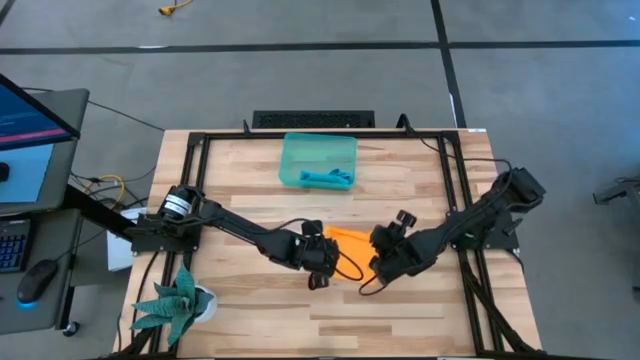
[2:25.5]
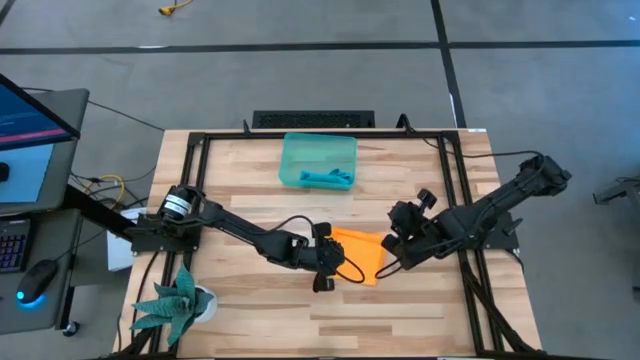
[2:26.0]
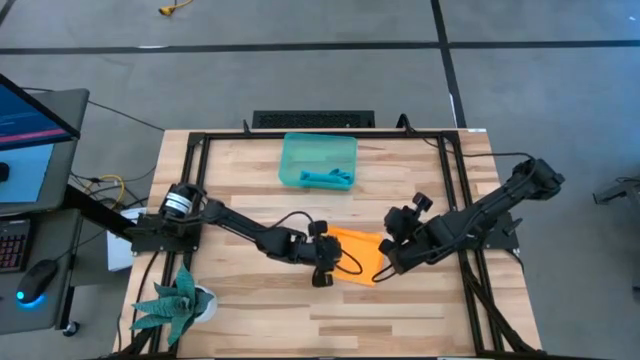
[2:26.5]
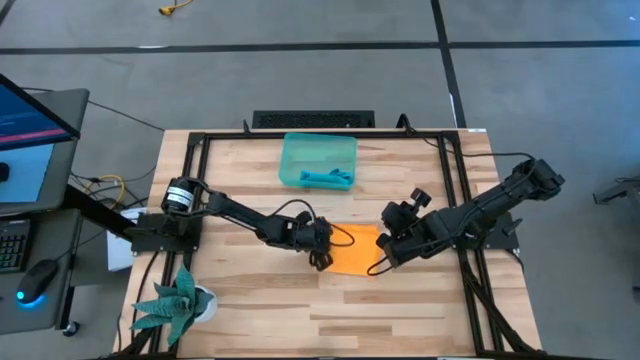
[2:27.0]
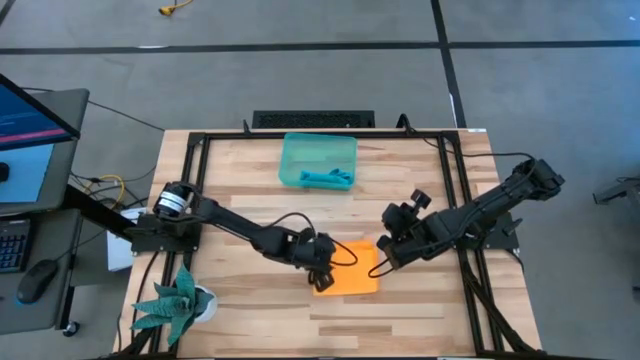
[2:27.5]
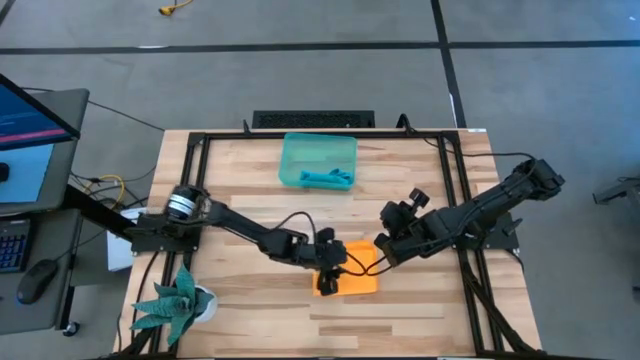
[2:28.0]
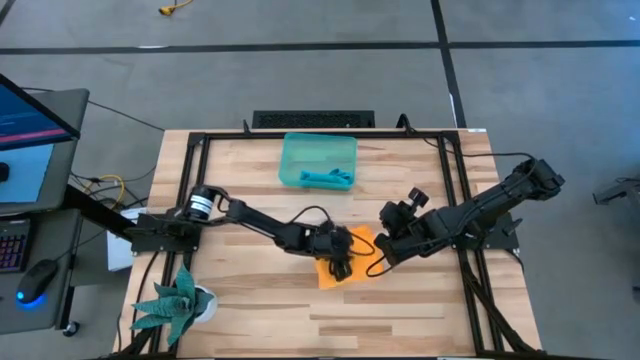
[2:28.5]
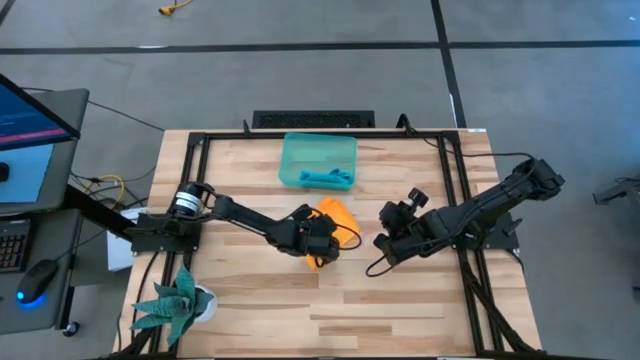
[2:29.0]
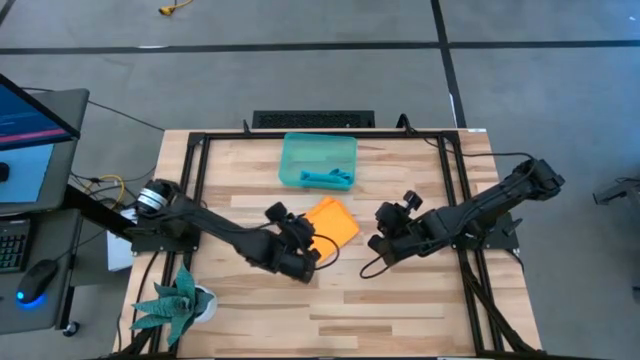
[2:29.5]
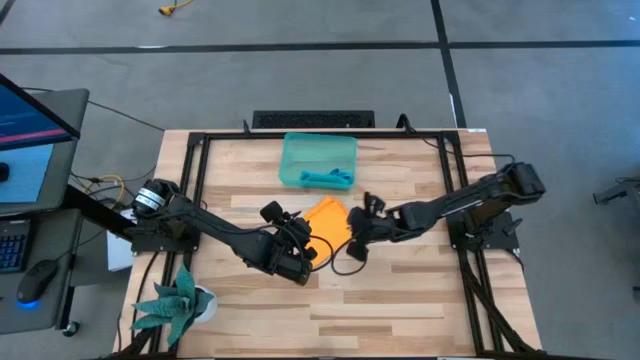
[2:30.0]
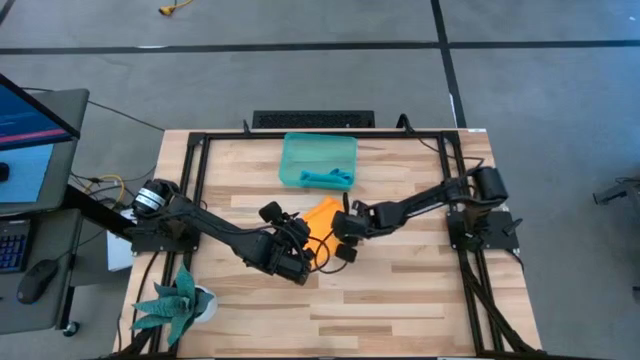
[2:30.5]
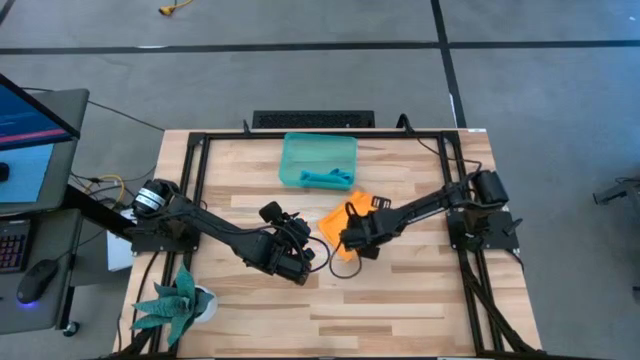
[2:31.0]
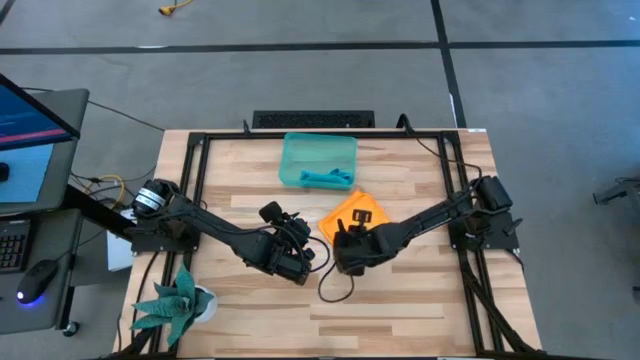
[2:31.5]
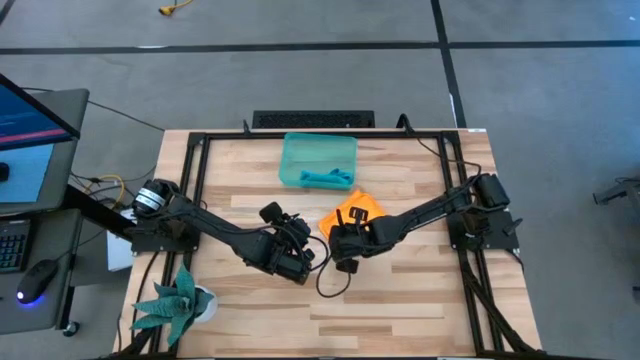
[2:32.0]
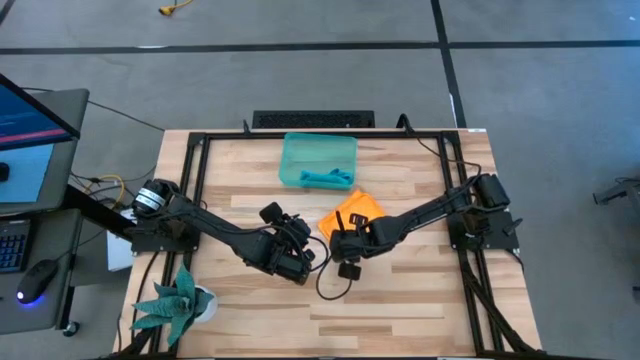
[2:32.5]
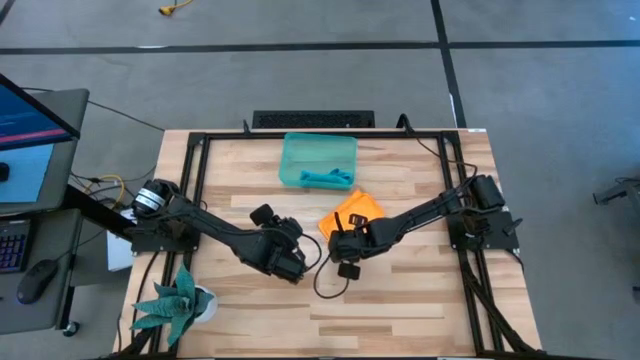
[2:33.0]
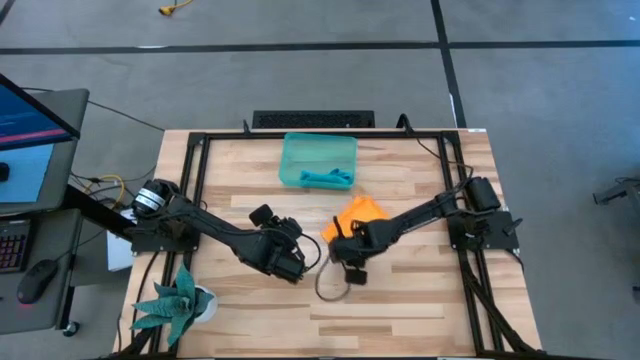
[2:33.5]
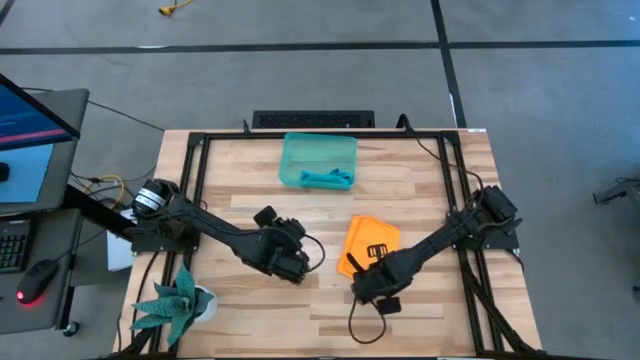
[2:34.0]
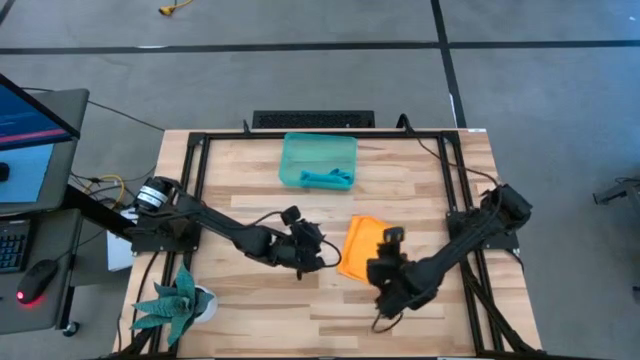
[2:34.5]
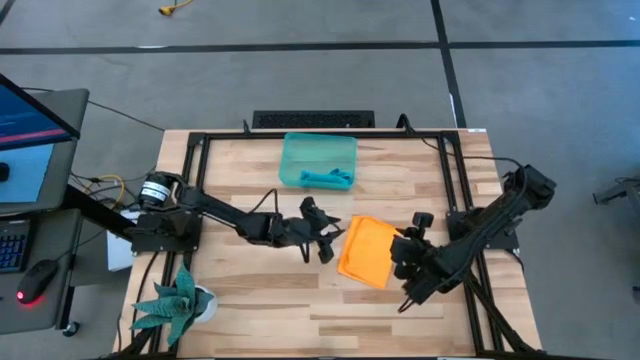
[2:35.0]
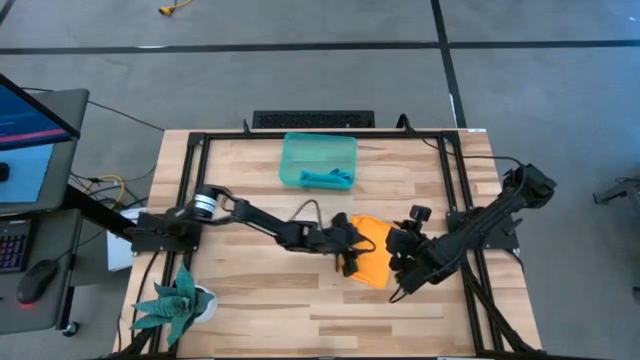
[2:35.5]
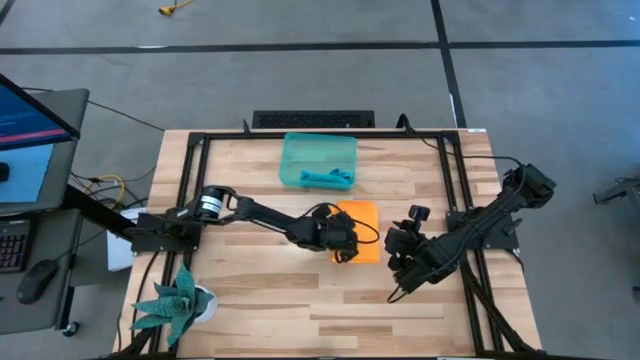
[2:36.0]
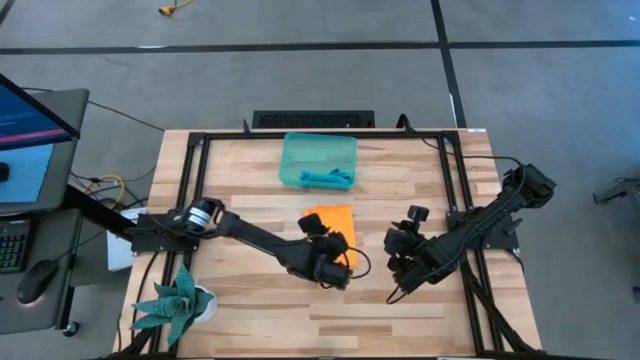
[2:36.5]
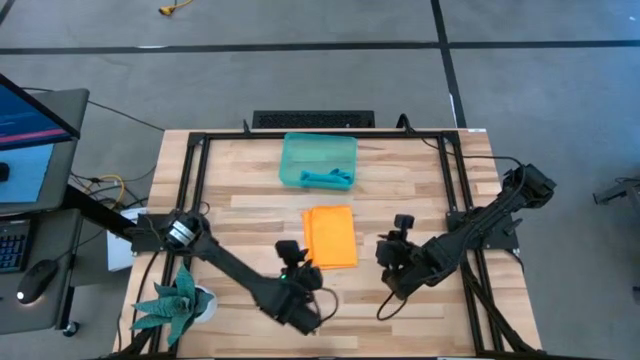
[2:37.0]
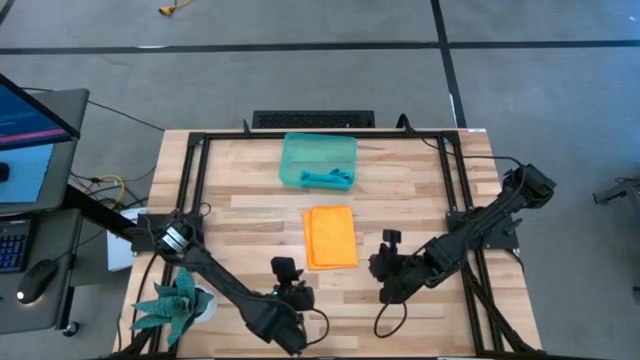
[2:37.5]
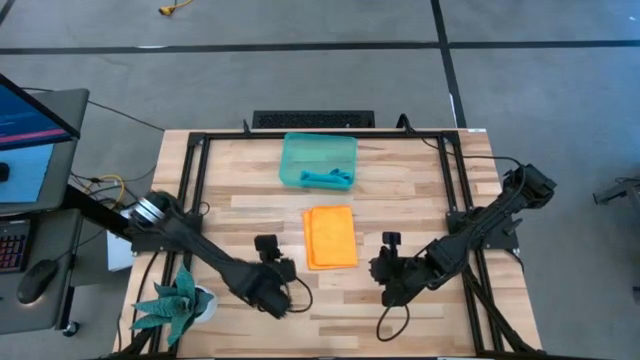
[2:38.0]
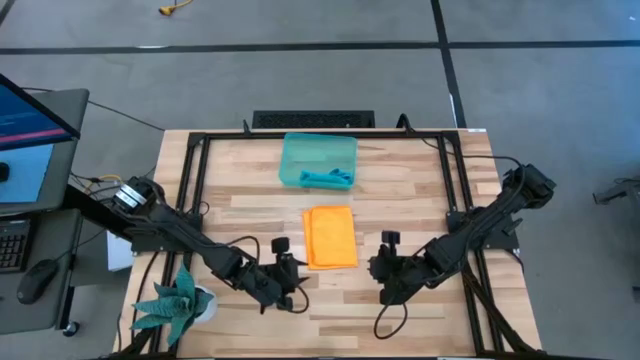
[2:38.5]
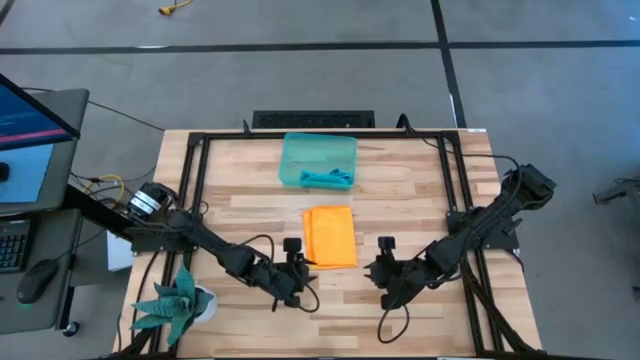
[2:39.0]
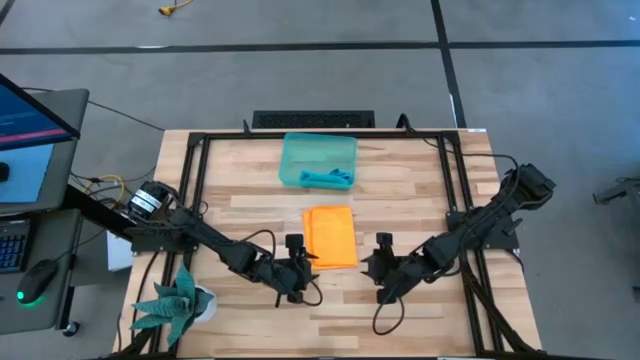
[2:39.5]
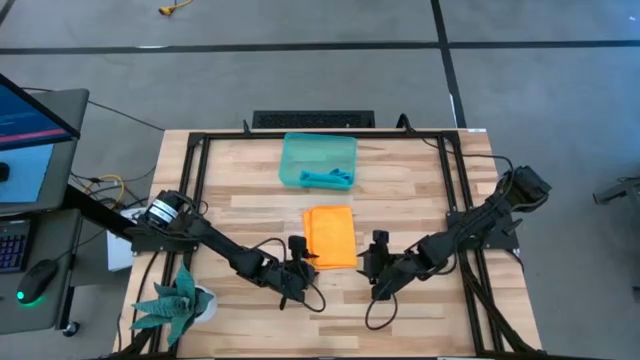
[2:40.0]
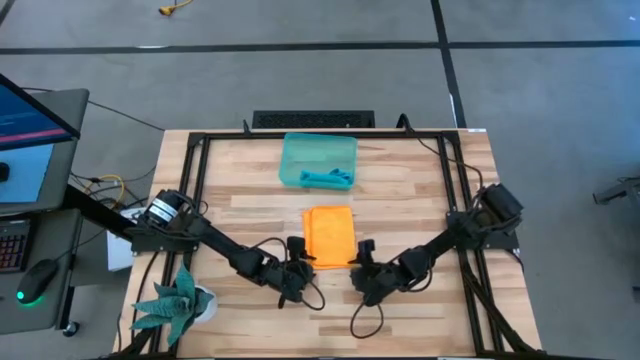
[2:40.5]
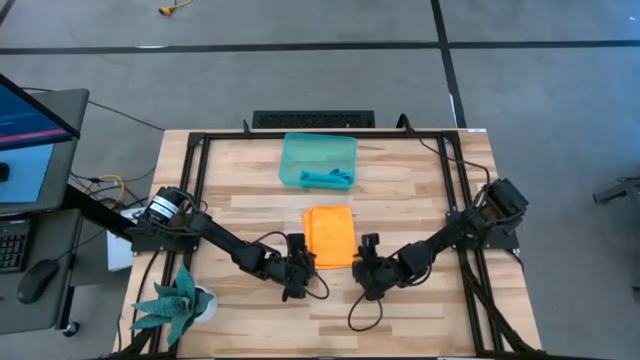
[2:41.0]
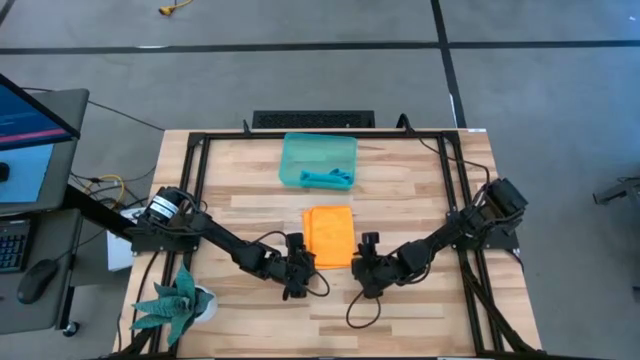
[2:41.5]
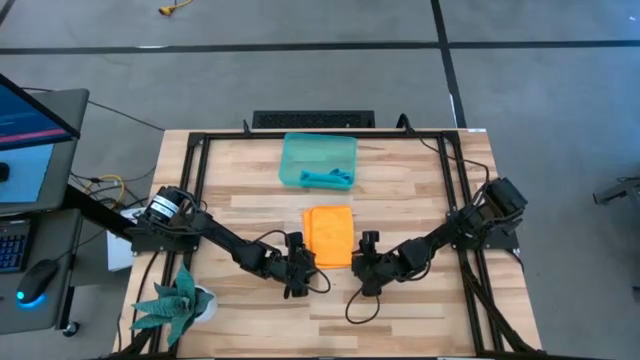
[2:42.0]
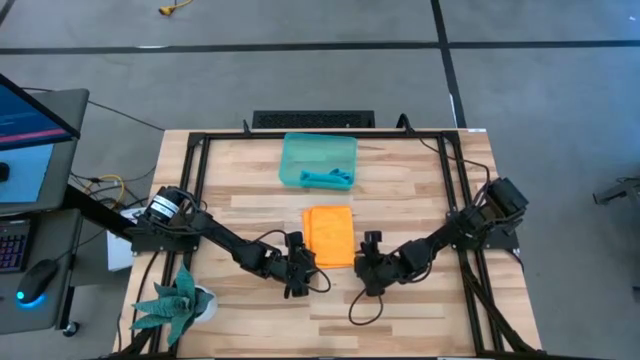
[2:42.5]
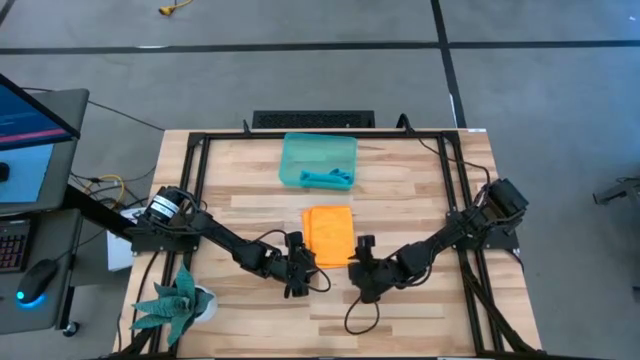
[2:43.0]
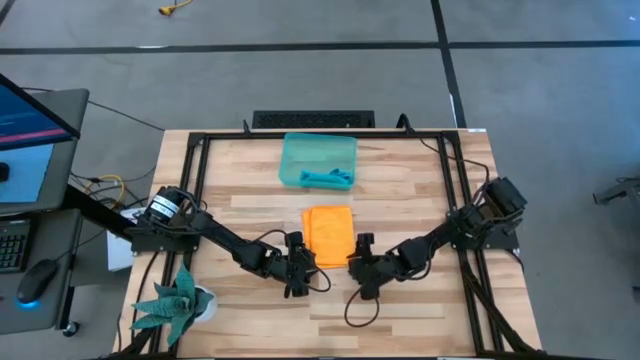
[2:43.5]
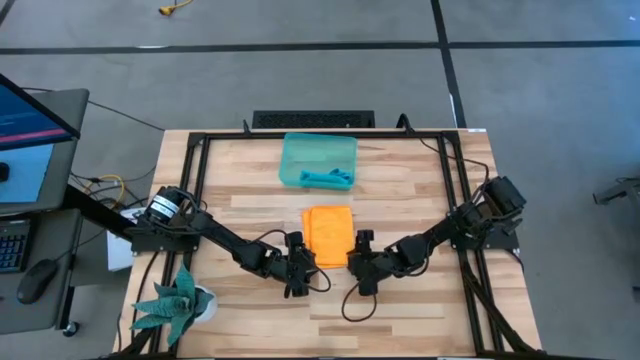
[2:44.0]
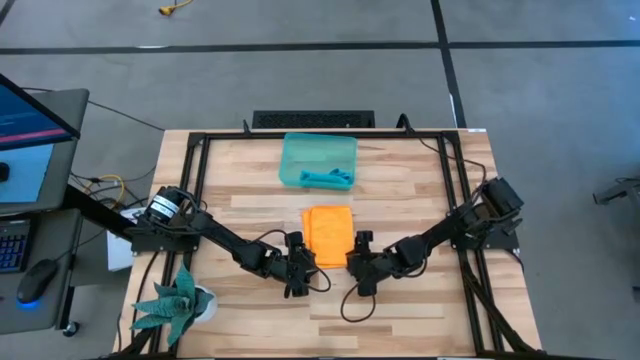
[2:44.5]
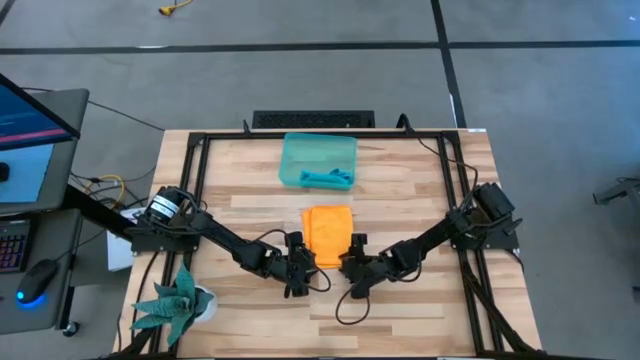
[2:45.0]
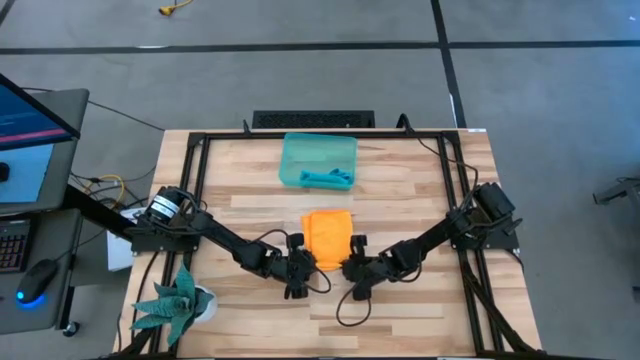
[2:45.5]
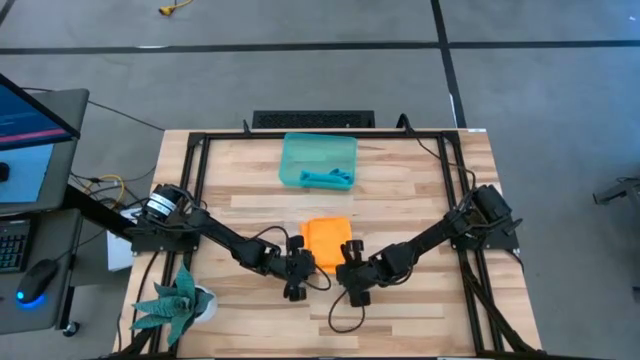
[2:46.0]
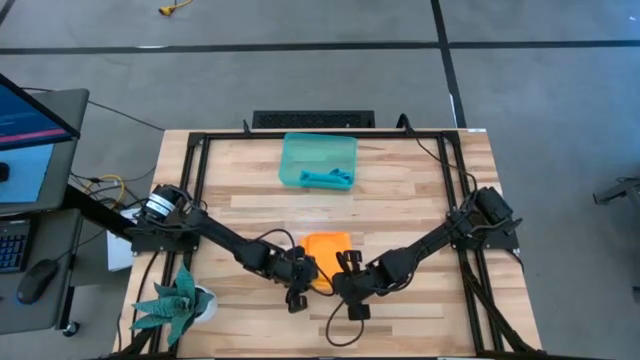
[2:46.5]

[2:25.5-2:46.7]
Task: Roll microfiber towels into tight, uniform cylinder then place into a basket
Fold the yellow microfiber cloth

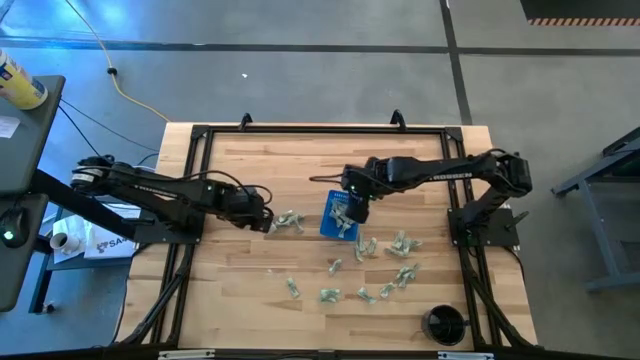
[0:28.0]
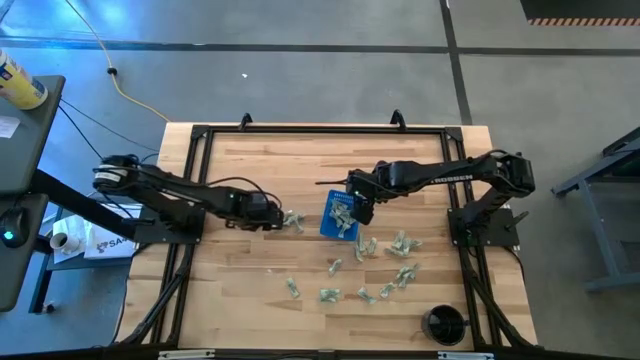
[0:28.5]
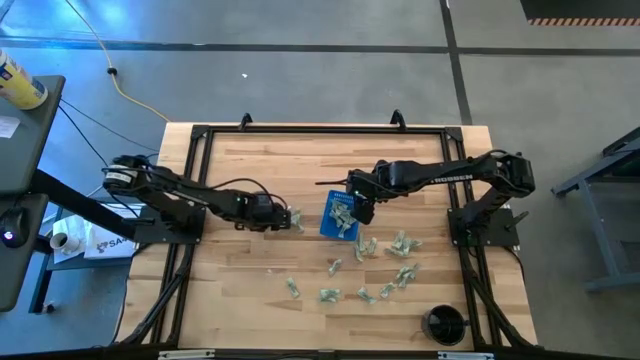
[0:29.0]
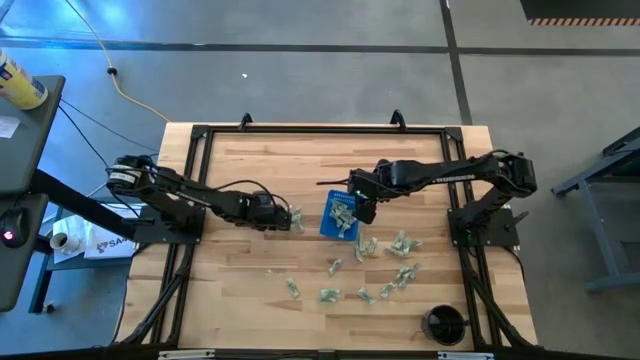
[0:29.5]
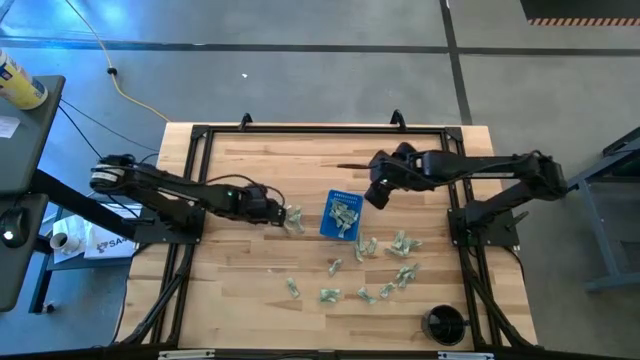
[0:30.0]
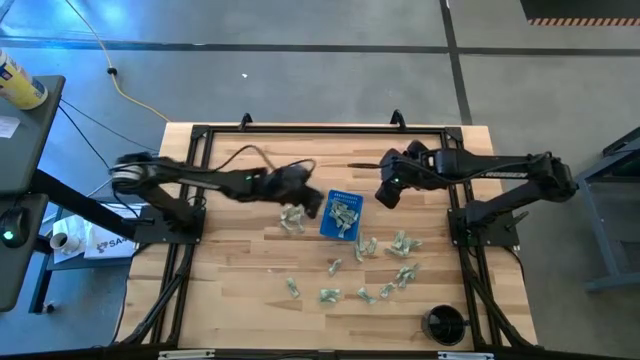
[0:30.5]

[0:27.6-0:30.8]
Task: Pick and place Stevia / Truvia into bins
Put the stevia packet into the blue basket
